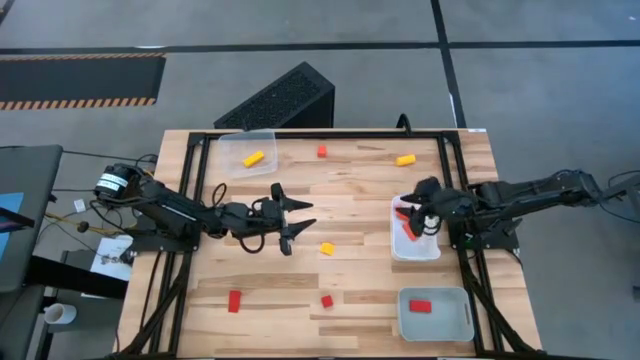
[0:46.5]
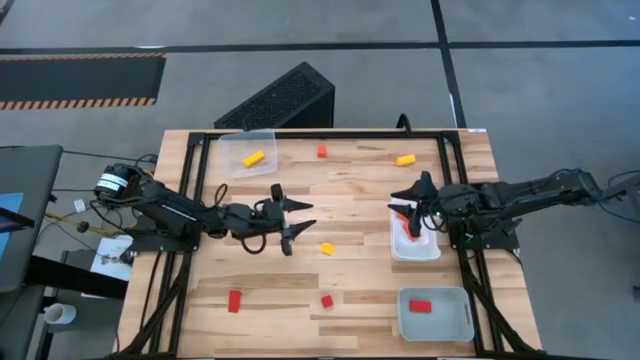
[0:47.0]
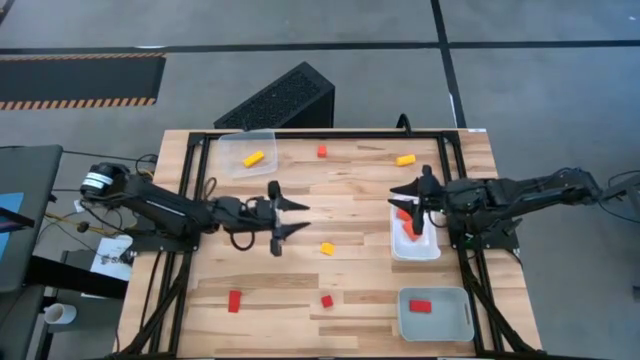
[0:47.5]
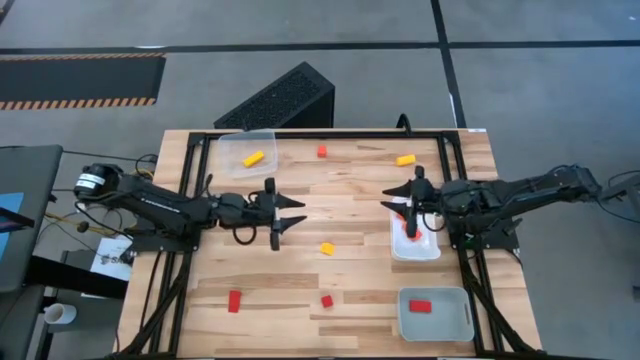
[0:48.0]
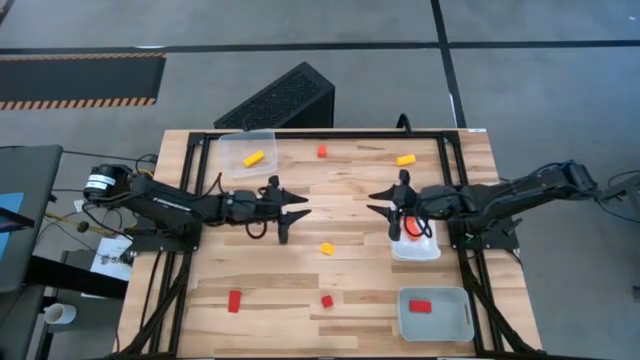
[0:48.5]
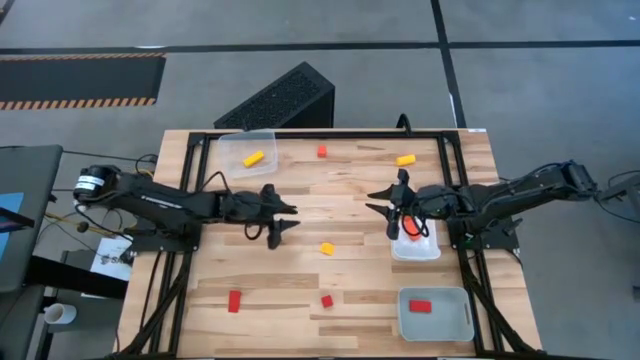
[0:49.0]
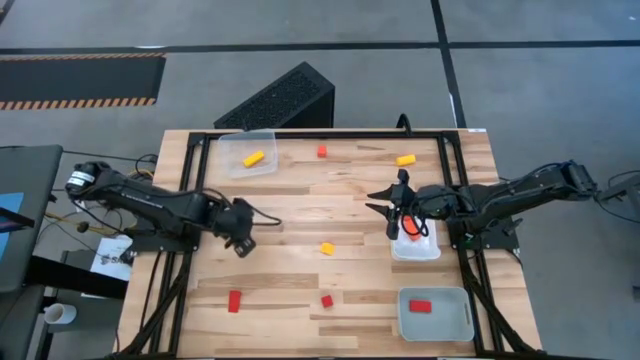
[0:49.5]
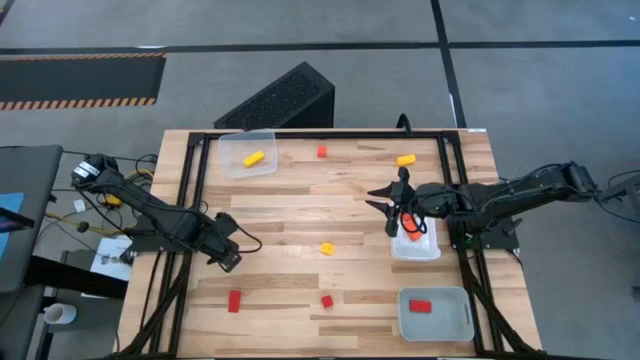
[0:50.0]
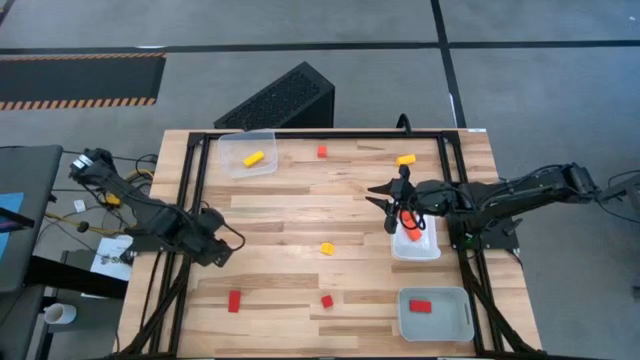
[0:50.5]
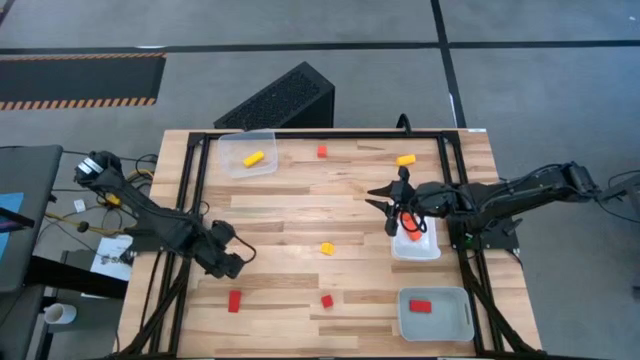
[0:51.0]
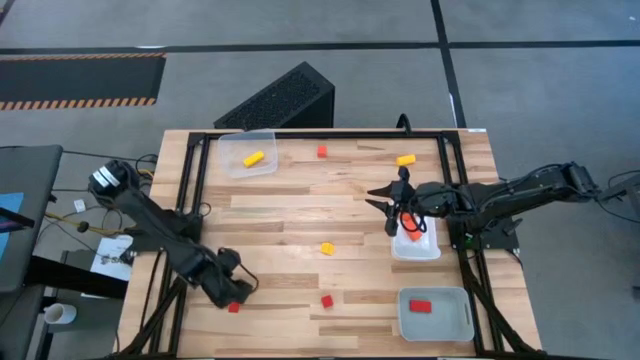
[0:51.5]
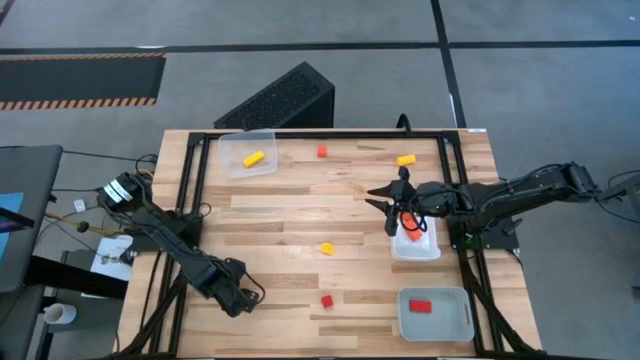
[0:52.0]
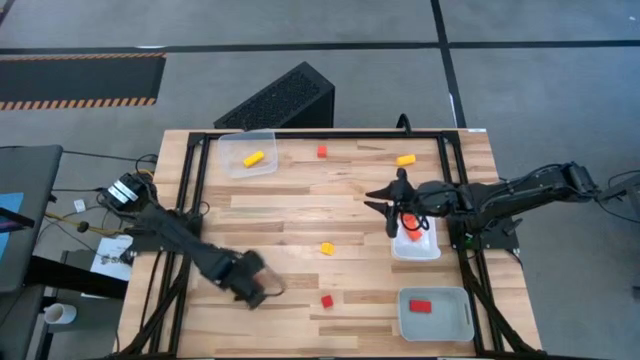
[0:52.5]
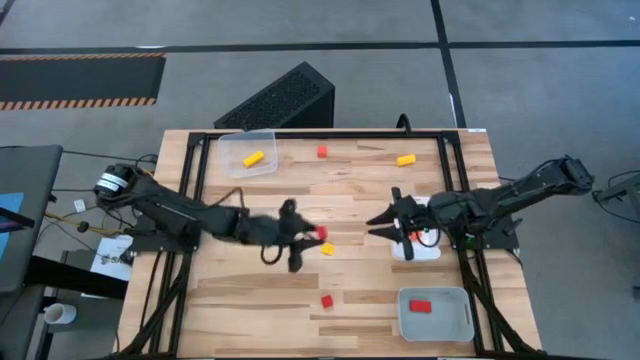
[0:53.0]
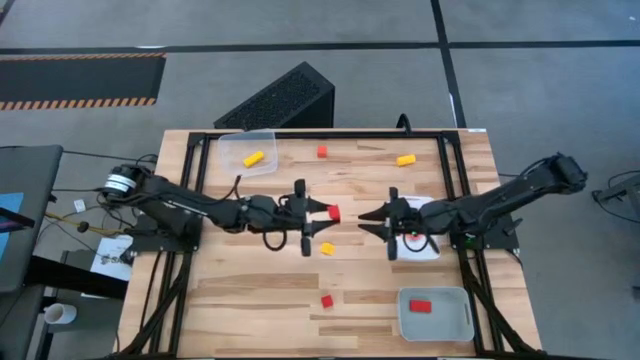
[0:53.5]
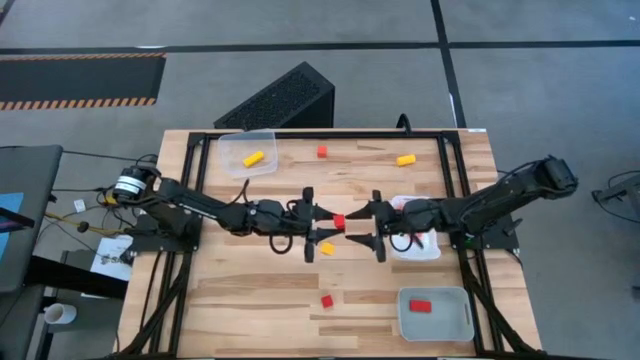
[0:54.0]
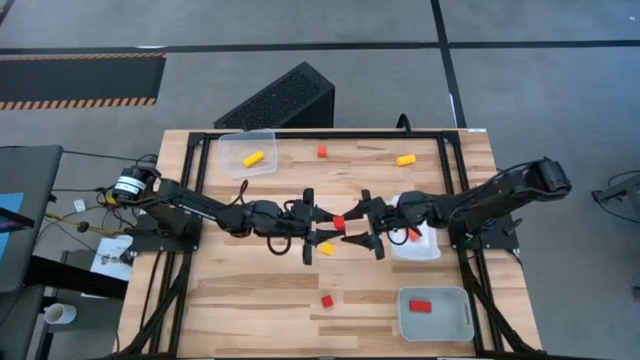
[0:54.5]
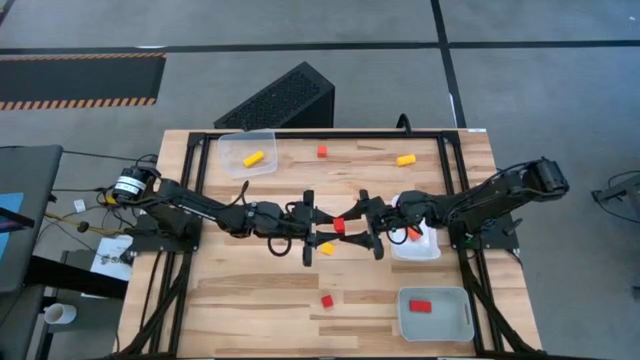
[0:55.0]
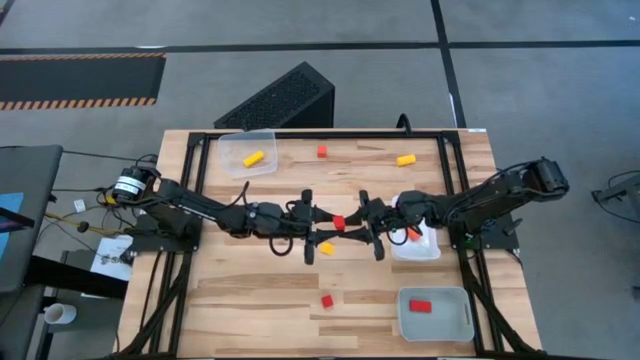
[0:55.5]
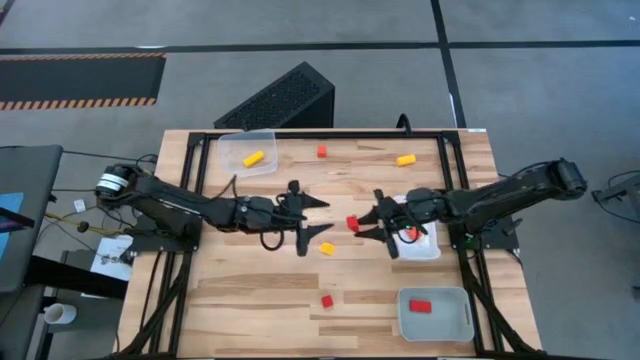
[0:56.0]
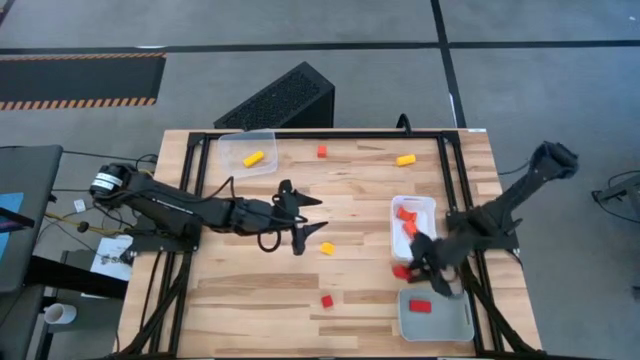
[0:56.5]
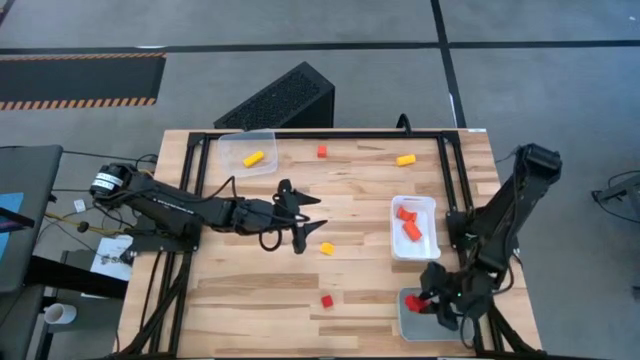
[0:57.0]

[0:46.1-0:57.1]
Task: Sort & place blocks by color
Put the left red block into the gray bin

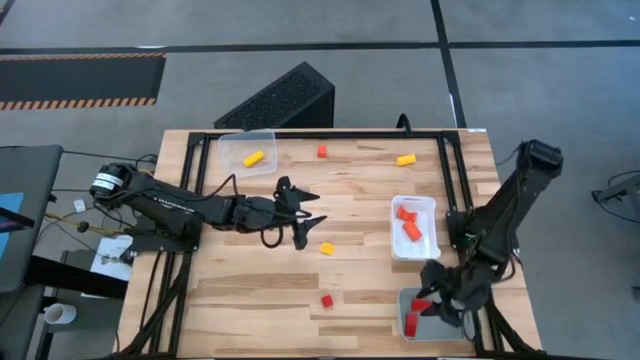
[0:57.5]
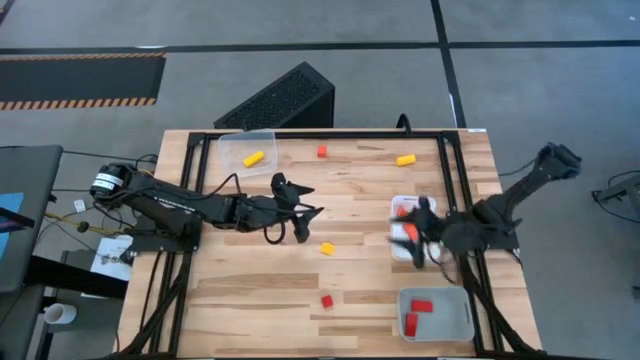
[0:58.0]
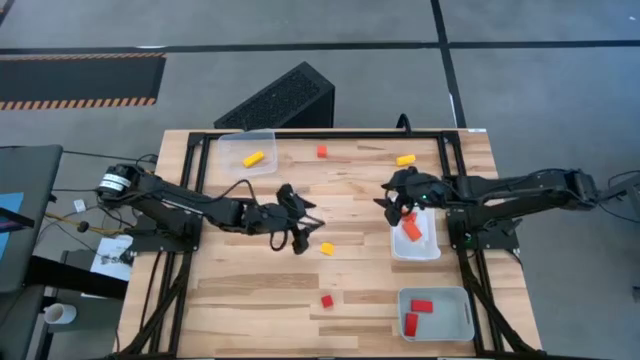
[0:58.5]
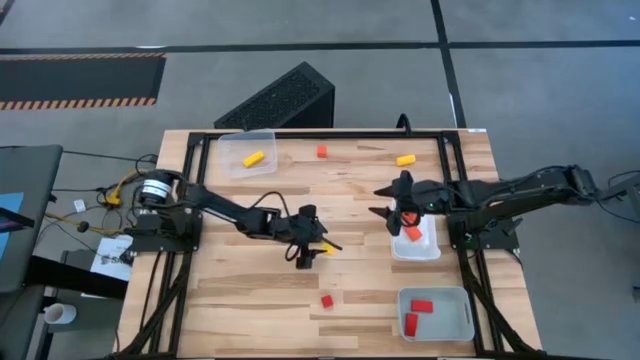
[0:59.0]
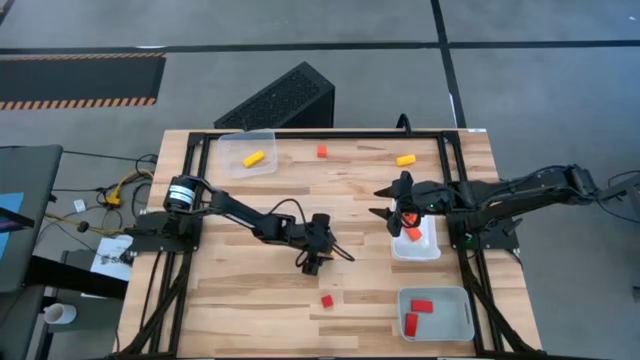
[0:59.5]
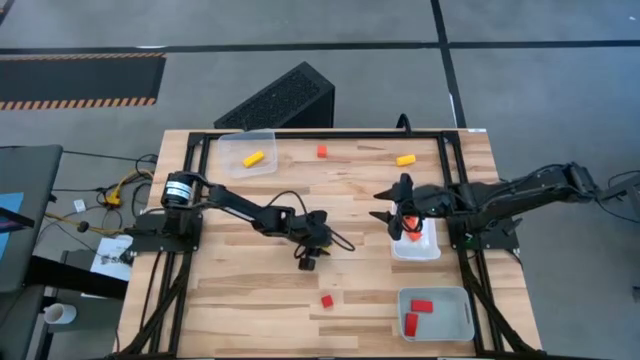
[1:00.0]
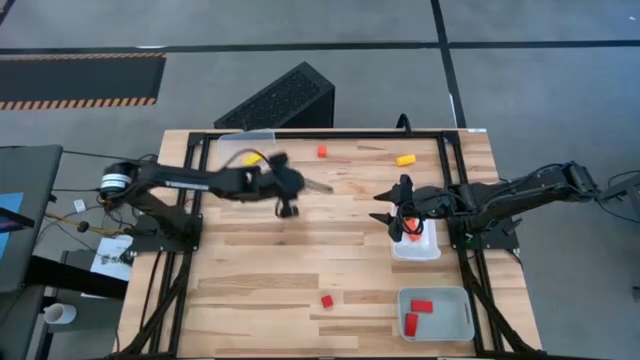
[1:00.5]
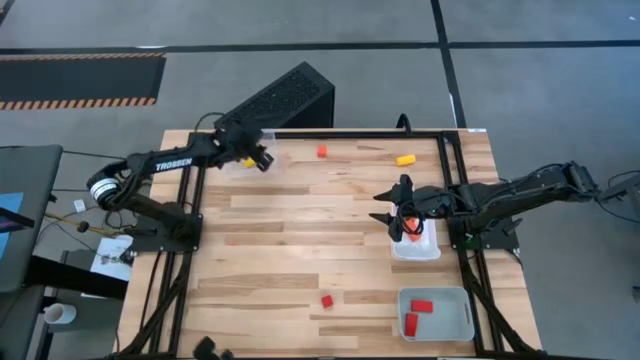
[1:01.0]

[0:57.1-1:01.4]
Put the bottom yellow block into the transparent bin

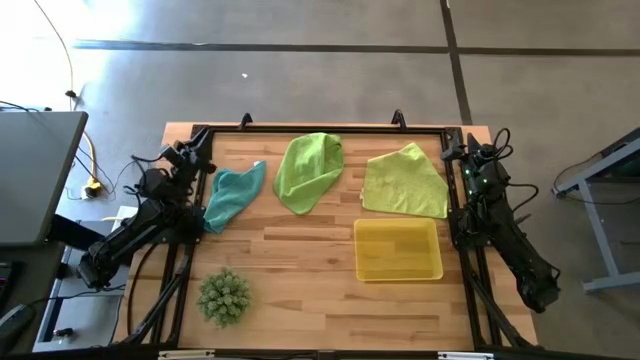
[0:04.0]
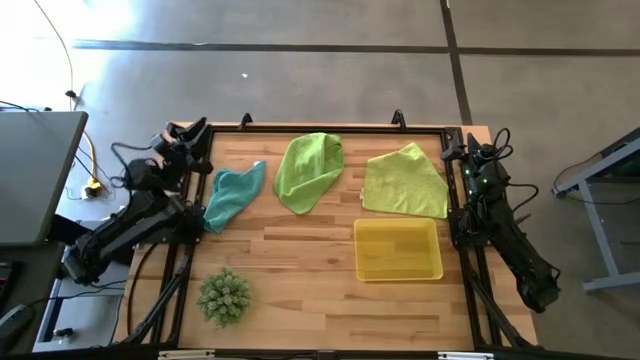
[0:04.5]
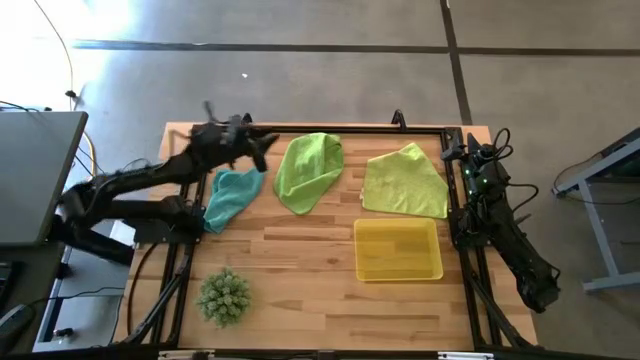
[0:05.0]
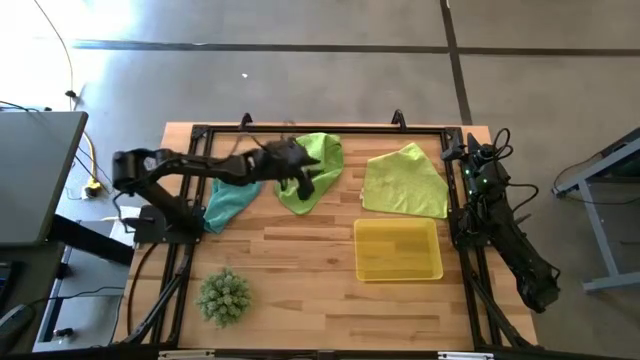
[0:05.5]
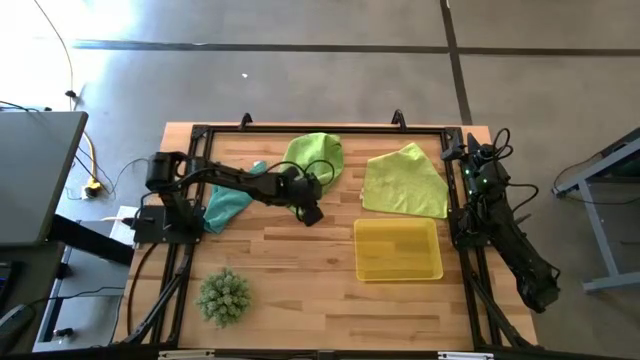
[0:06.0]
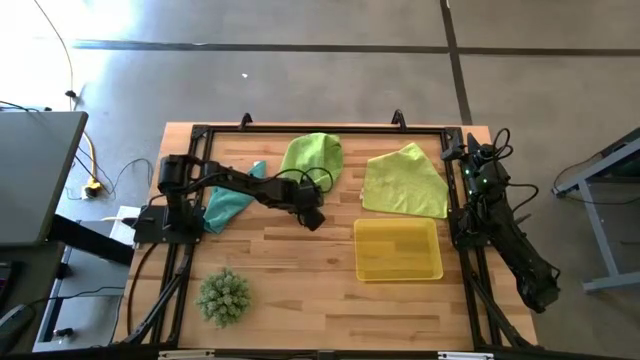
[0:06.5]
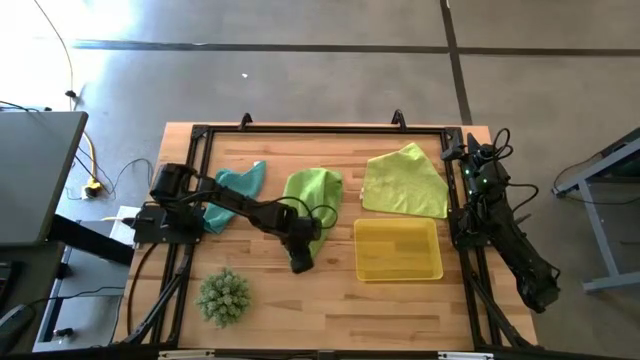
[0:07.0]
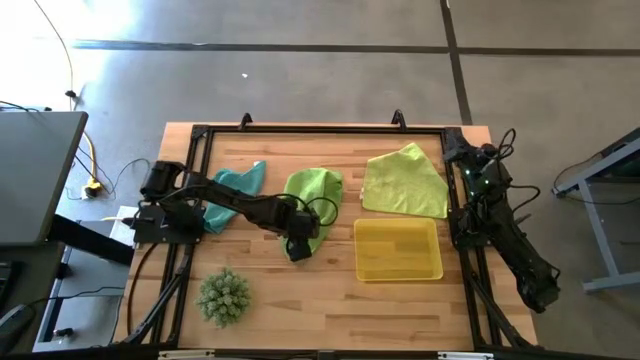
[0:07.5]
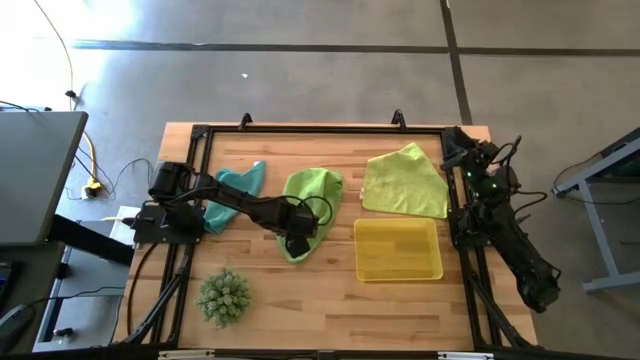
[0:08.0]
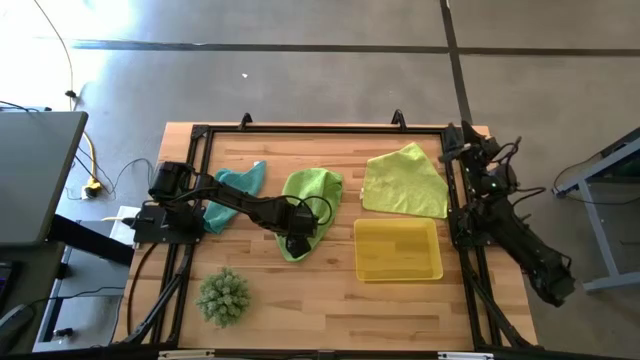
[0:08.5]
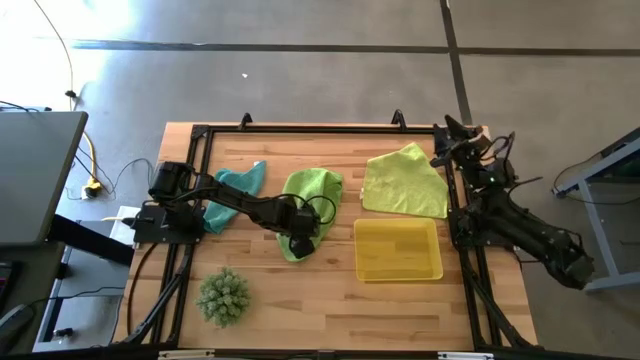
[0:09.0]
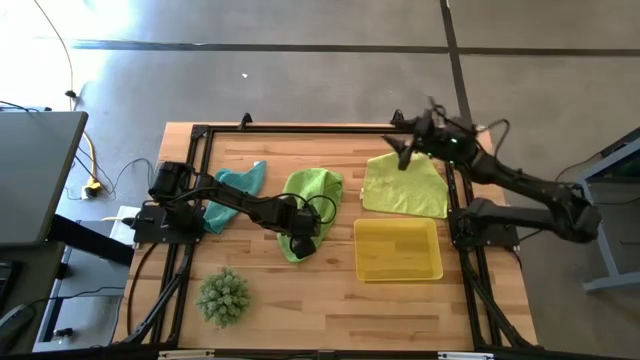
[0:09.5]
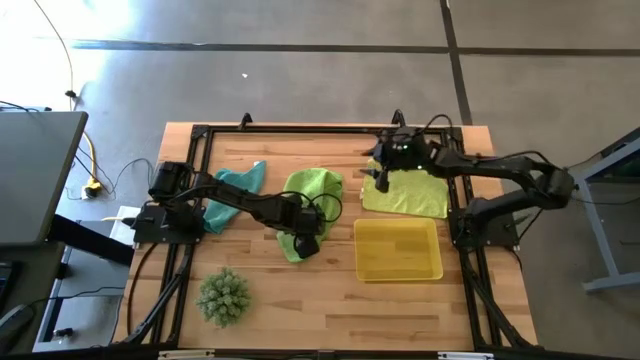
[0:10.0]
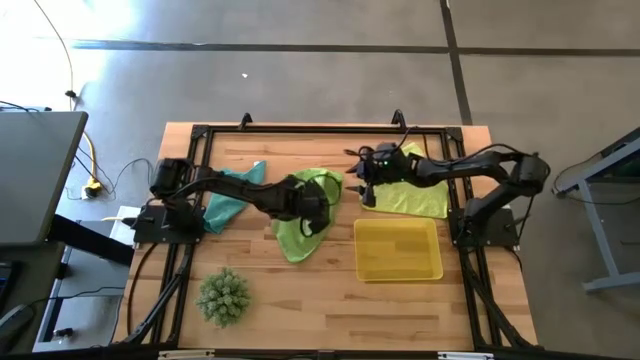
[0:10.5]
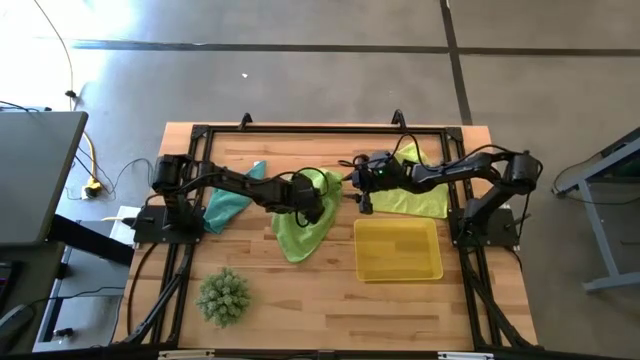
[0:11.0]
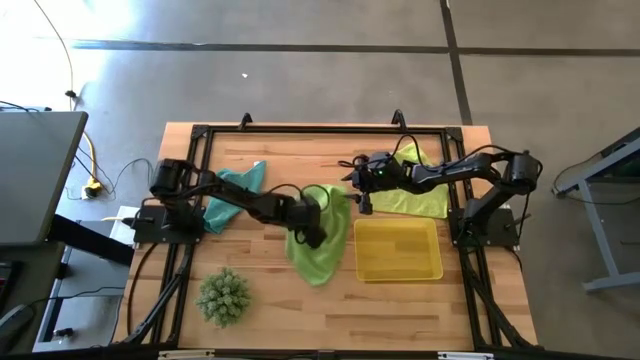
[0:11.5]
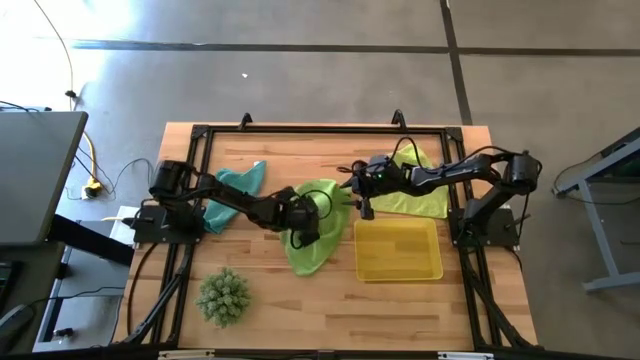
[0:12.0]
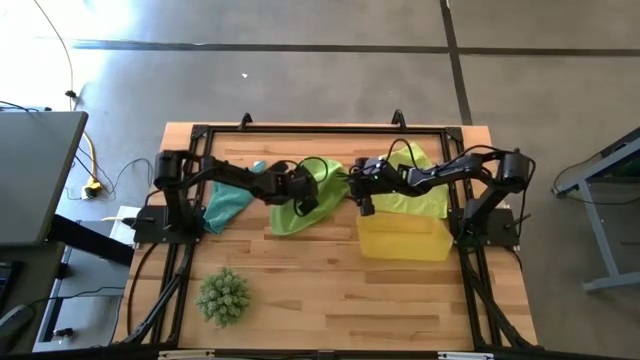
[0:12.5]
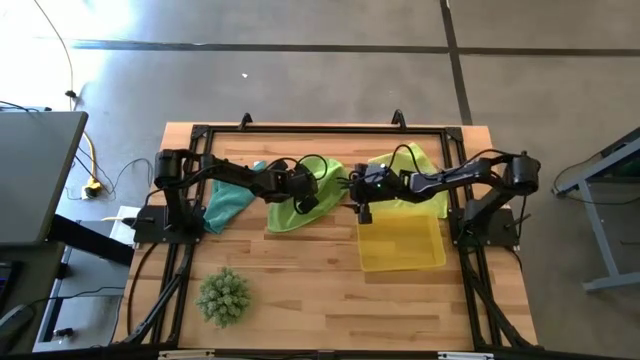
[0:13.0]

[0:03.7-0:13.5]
Task: Roll microfiber towels into tight, uniform cylinder then place into a basket
Prepare the green microfiber cloth to the center of the table
